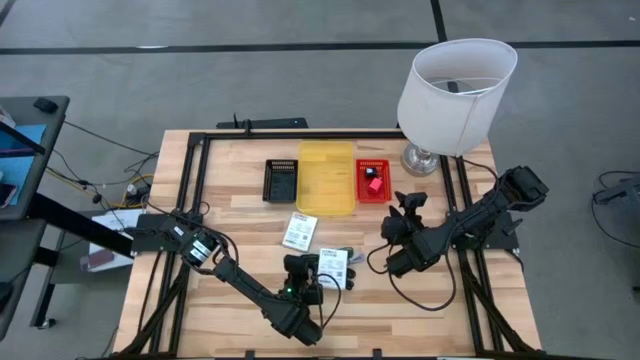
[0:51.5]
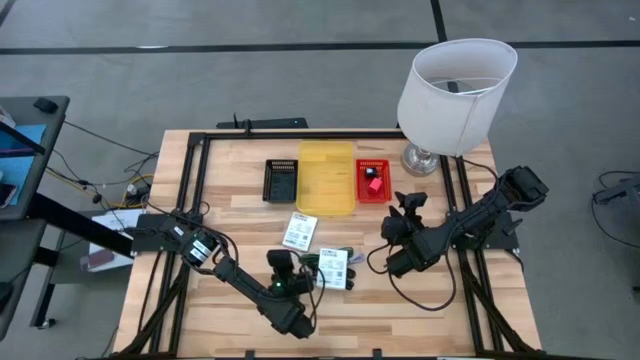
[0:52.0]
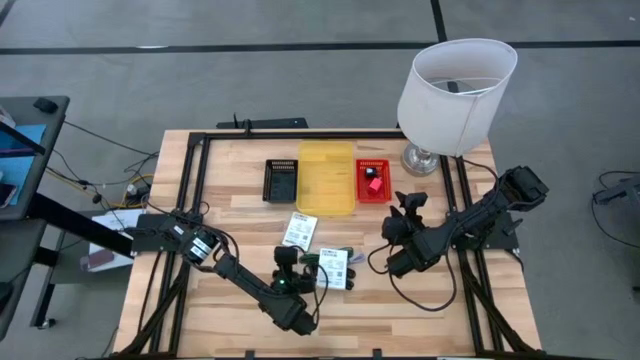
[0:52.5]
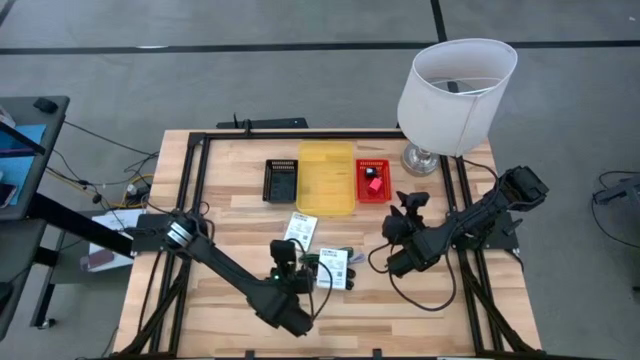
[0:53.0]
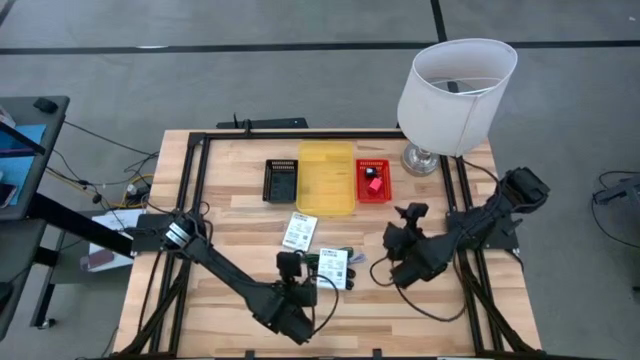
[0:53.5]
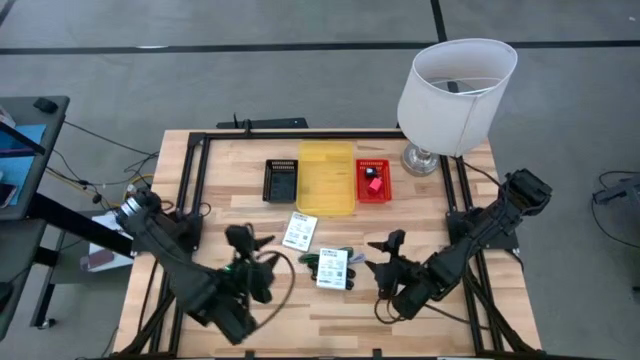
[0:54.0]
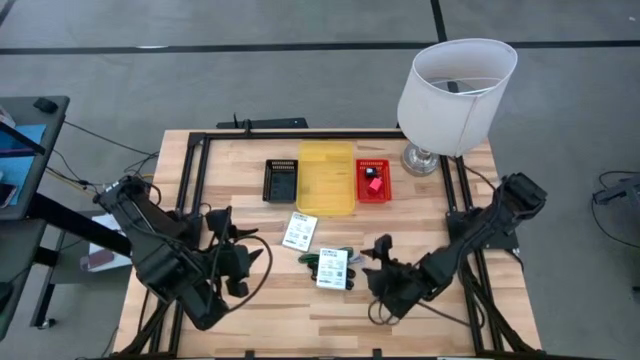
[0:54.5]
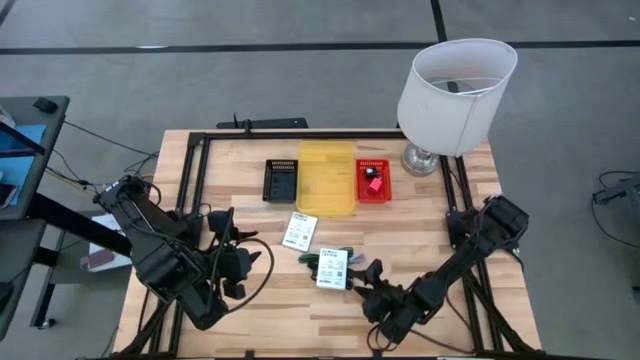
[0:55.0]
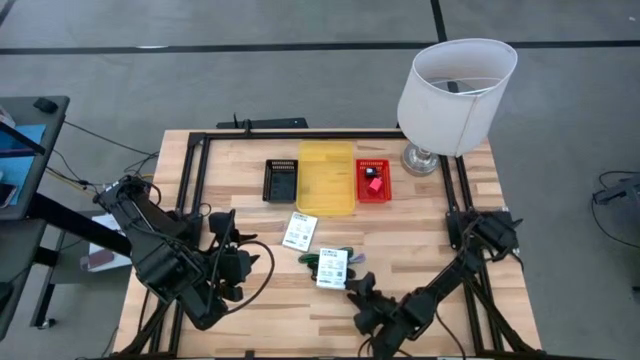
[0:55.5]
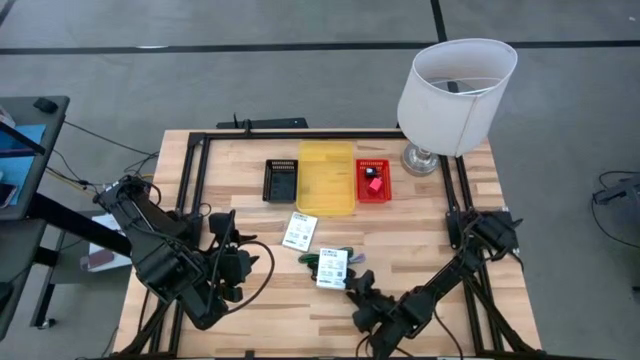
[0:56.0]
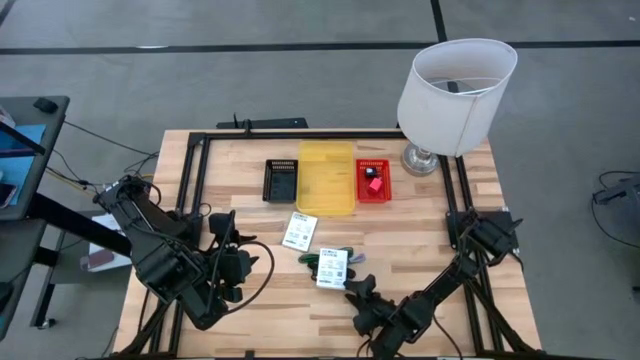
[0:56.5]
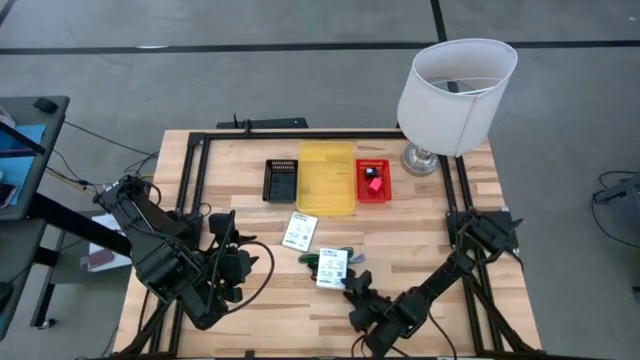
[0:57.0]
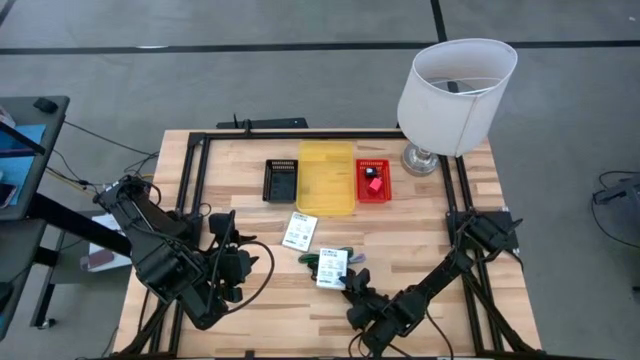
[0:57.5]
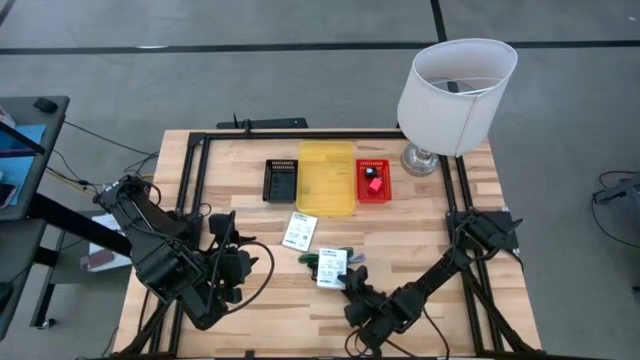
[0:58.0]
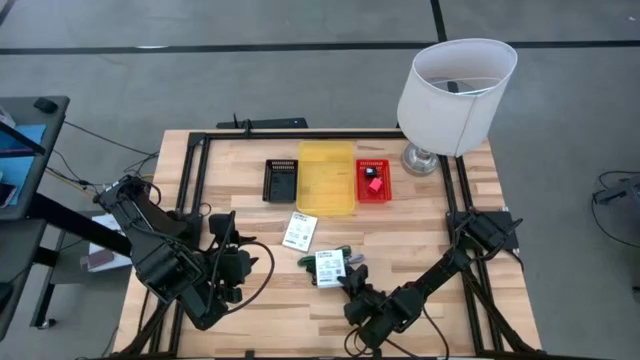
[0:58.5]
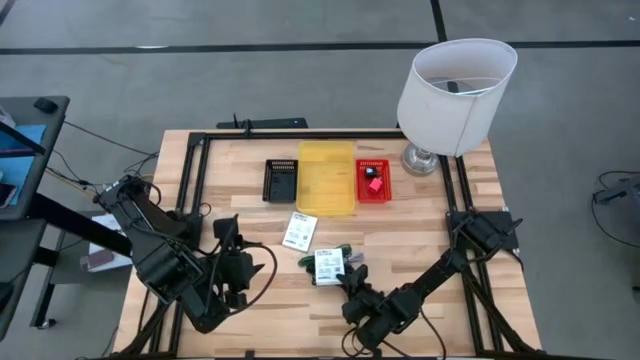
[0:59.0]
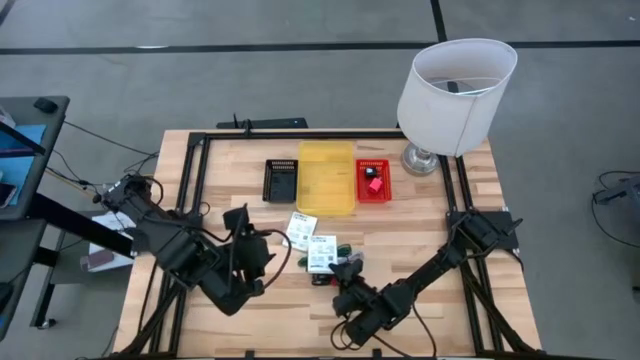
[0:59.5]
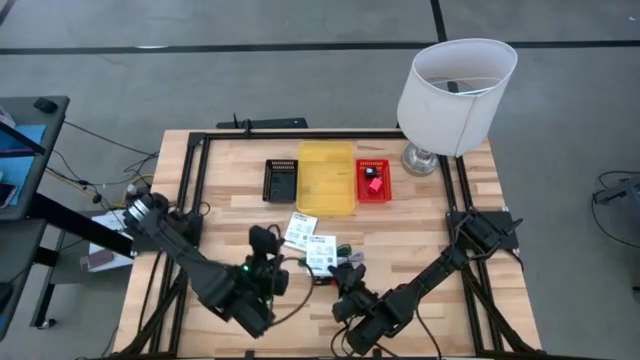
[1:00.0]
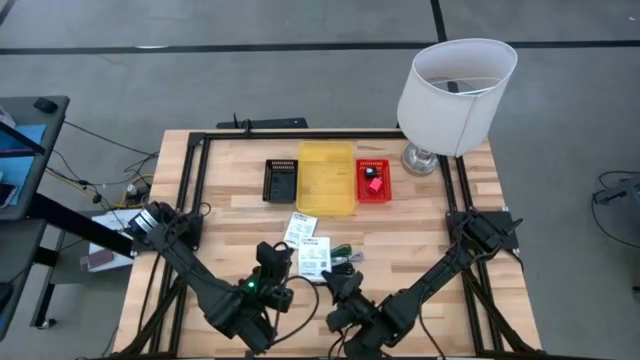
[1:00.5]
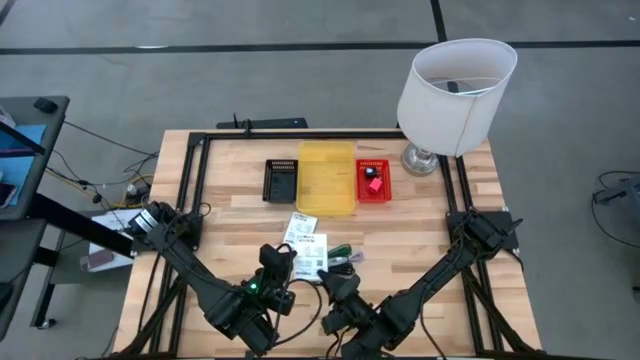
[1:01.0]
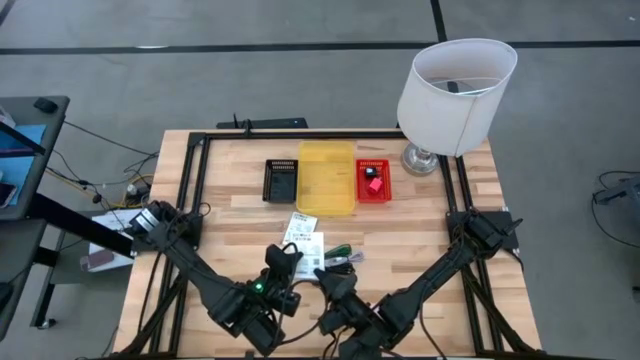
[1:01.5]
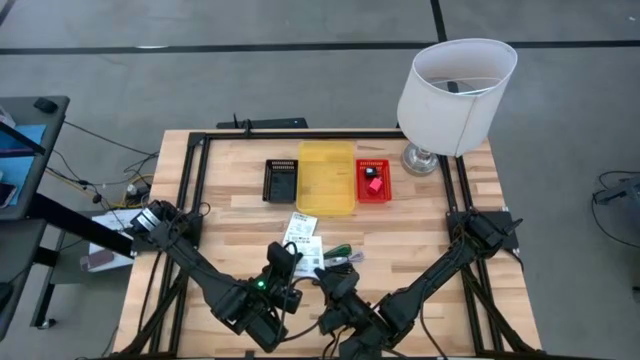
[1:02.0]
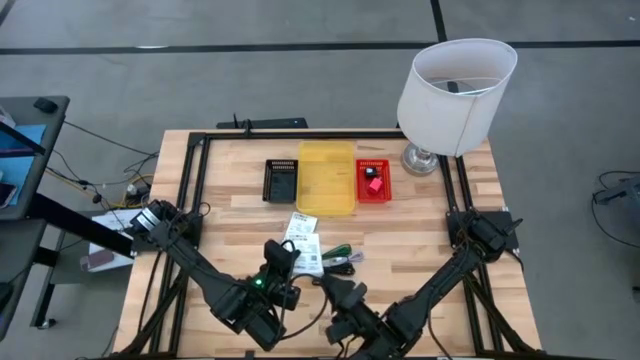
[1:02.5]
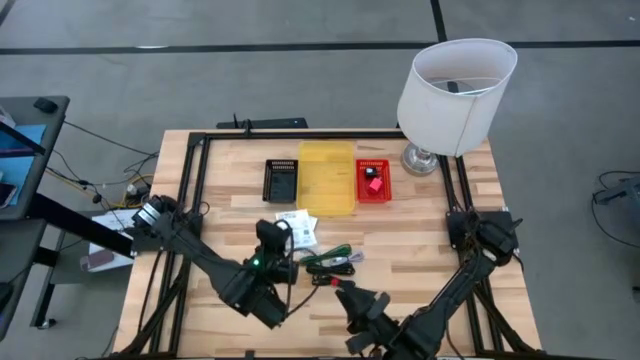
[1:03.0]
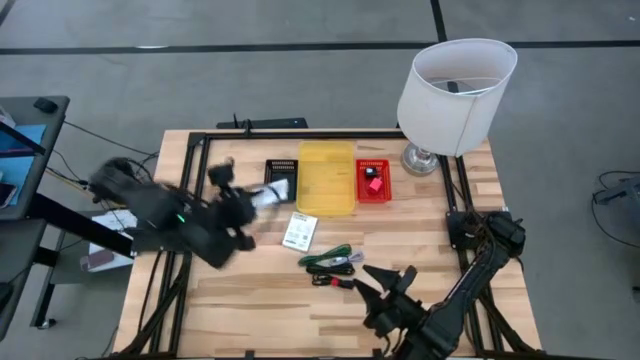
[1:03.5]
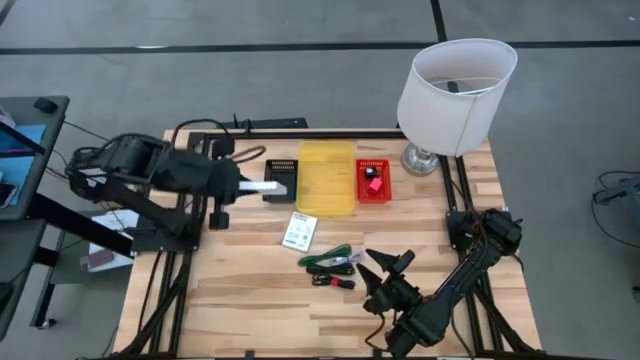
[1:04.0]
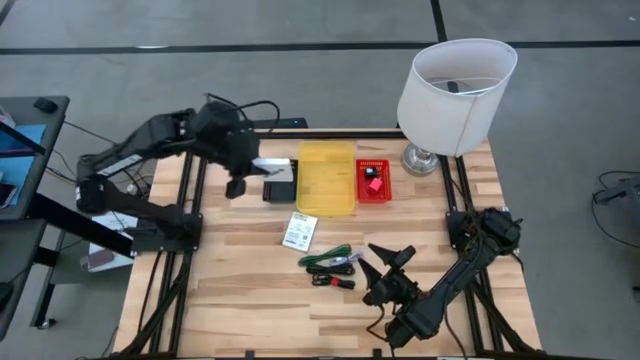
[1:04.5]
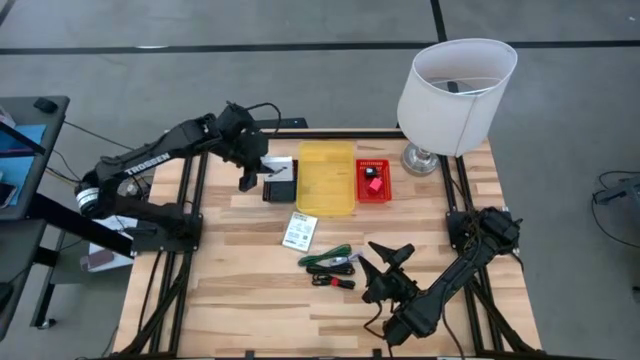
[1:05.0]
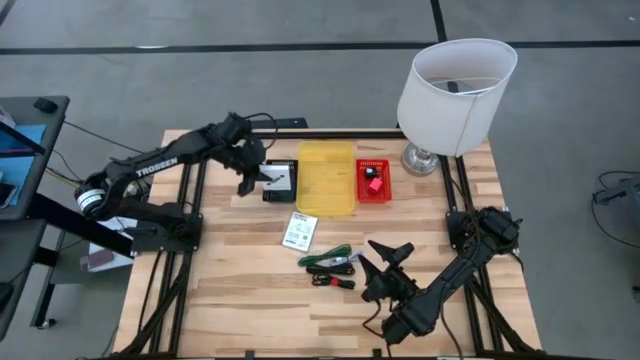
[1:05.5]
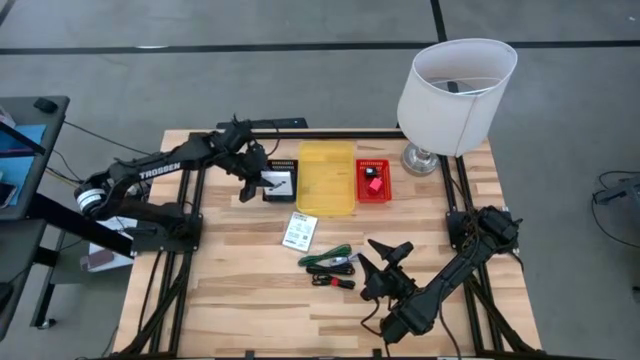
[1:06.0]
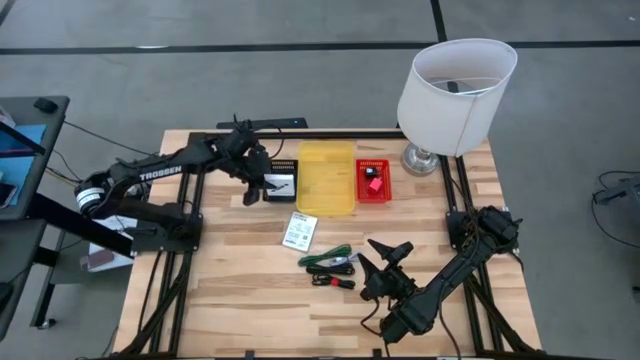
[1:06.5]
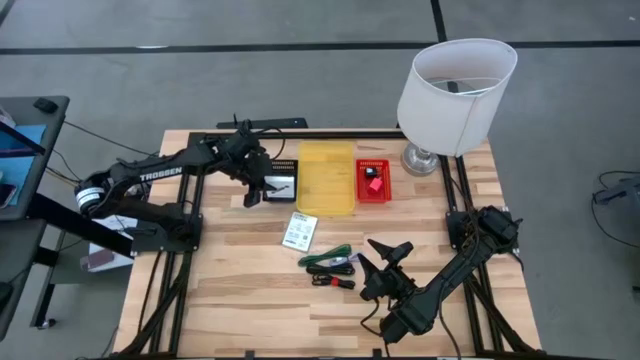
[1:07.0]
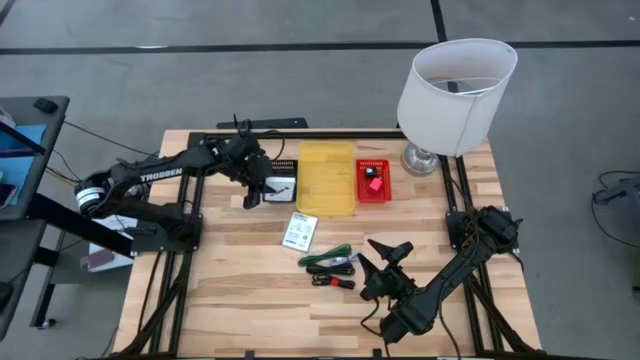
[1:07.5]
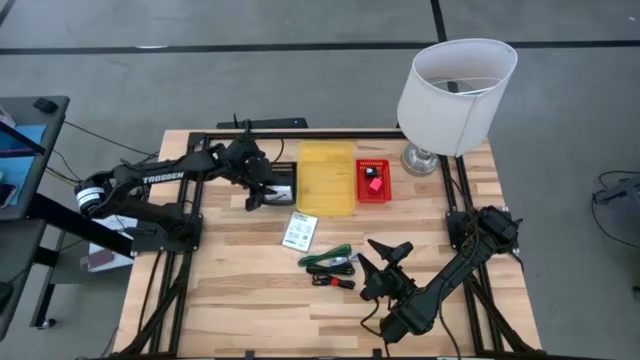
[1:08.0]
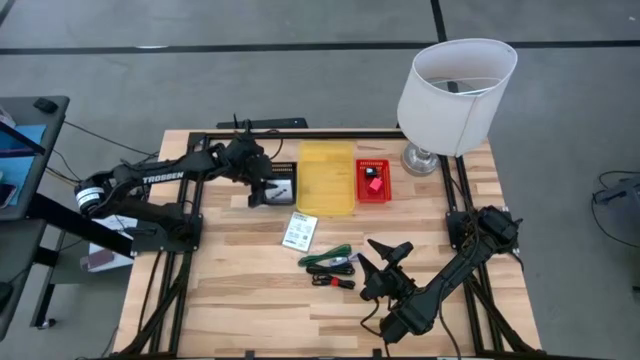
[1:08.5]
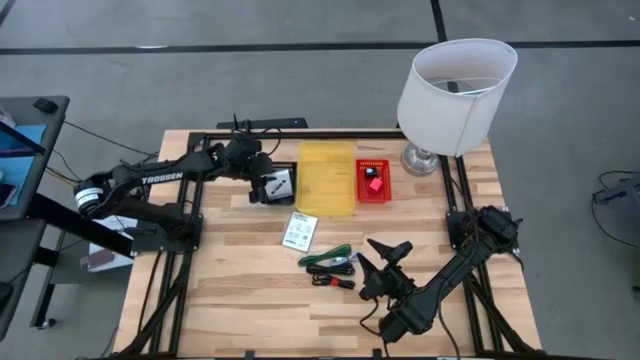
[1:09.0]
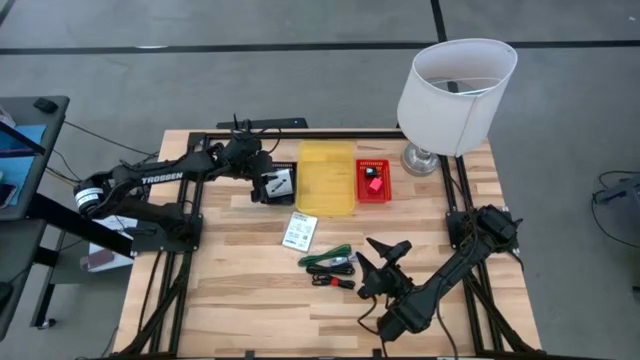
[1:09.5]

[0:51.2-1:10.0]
Task: Pick and place items into bin
Put the bottom card reader box into the black bin

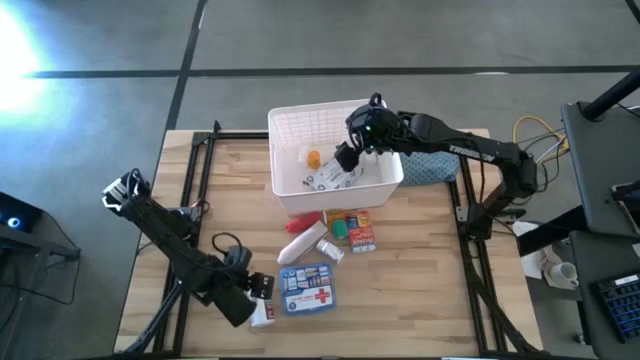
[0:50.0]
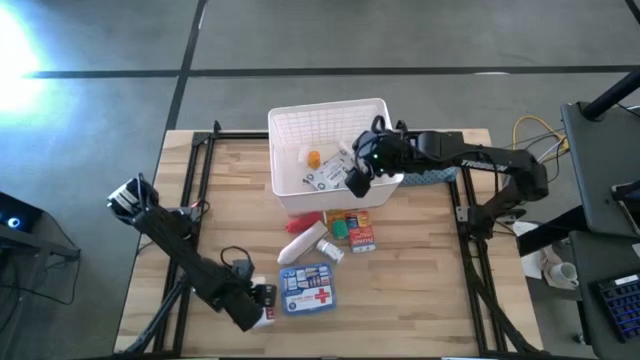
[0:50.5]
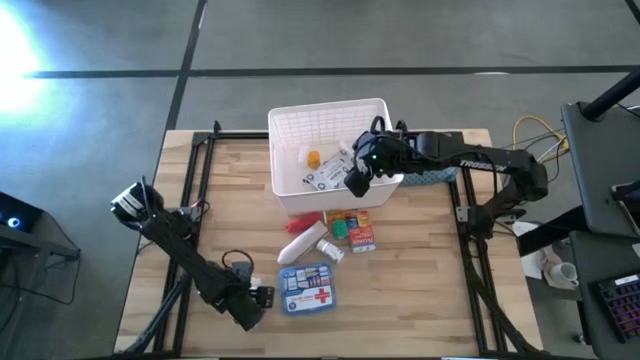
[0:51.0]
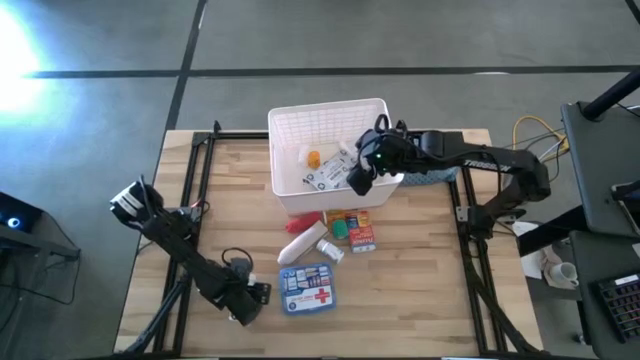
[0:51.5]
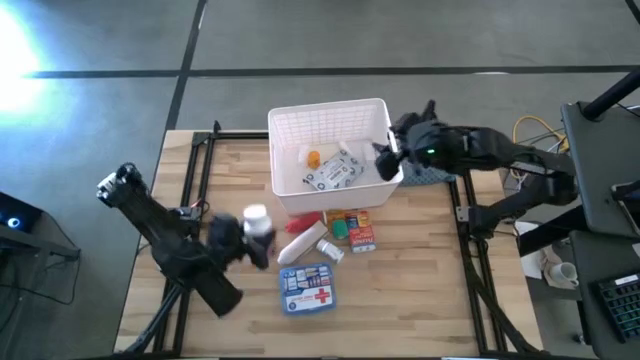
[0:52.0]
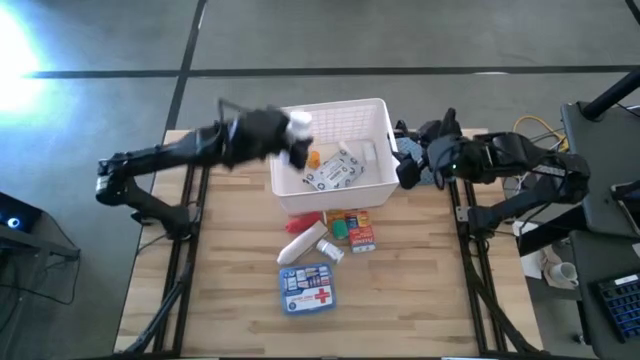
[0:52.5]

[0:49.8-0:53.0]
Task: Pick & place medical supplies in basket/bin
Put the white pill bottle into the white container

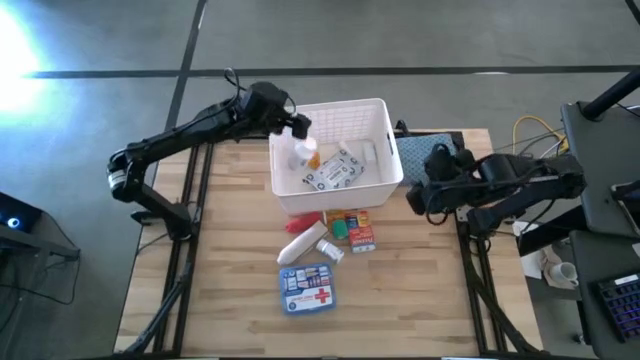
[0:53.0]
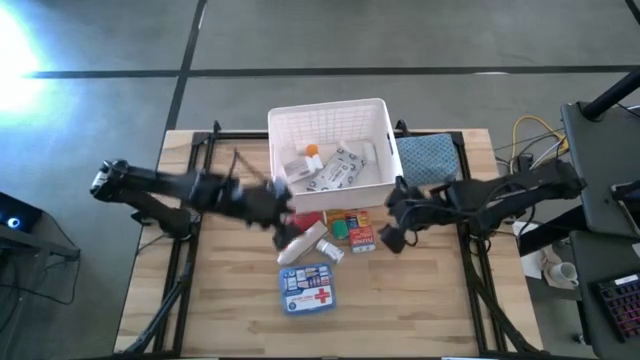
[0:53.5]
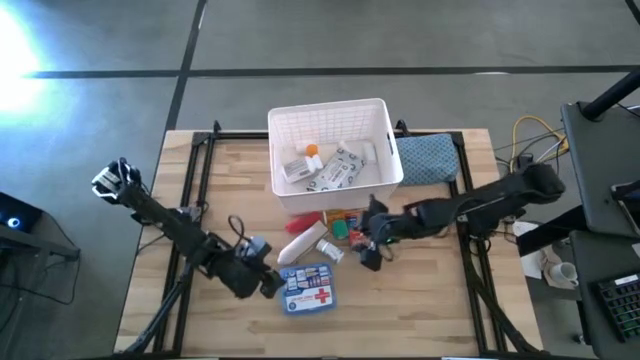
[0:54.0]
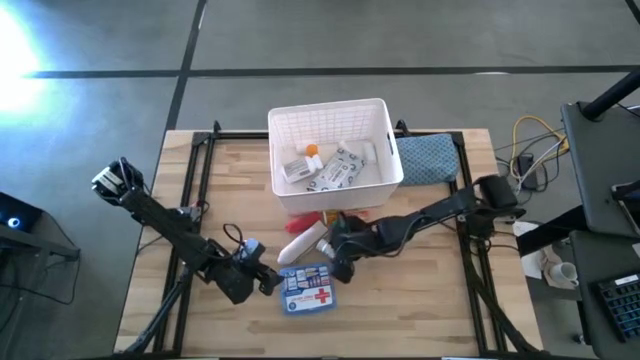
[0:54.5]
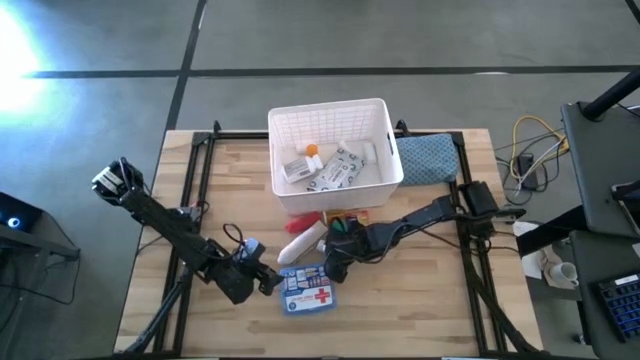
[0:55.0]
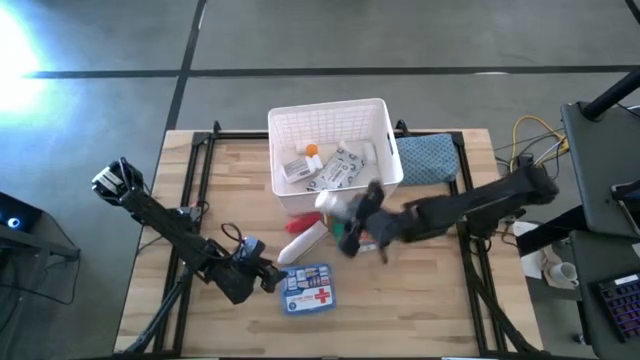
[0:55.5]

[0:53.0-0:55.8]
Put the white pill bottle into the white container
